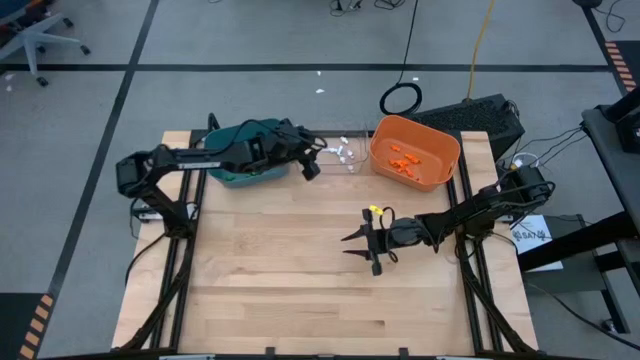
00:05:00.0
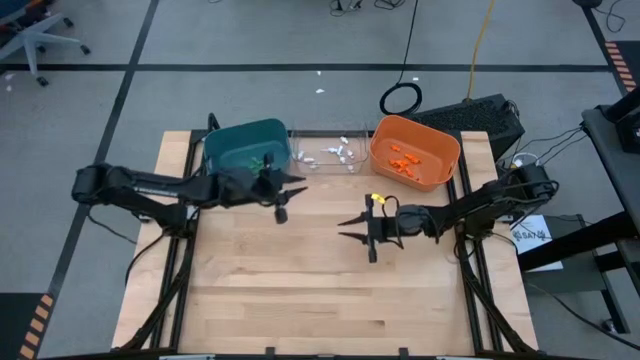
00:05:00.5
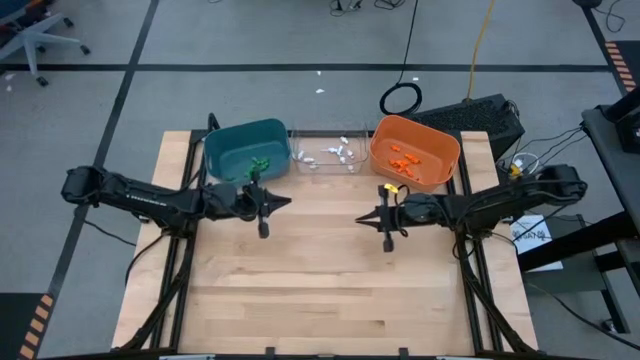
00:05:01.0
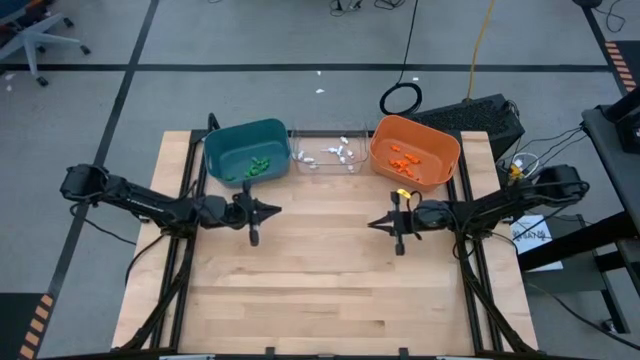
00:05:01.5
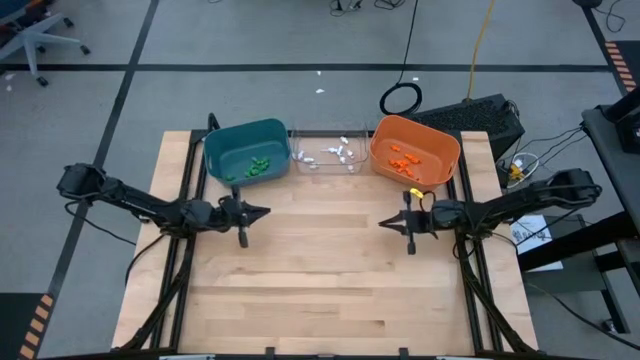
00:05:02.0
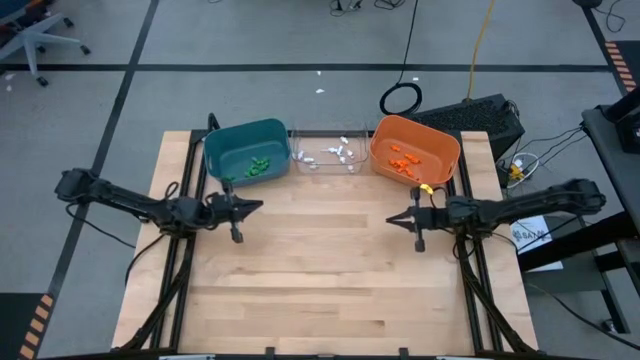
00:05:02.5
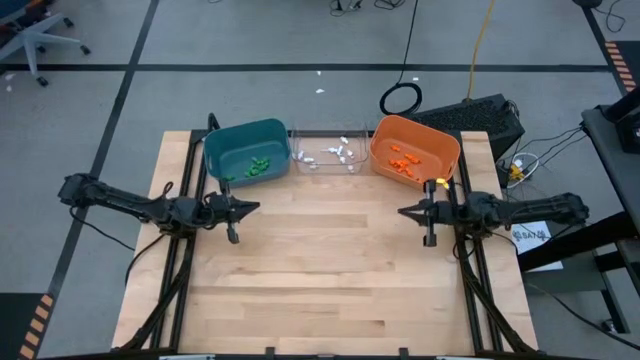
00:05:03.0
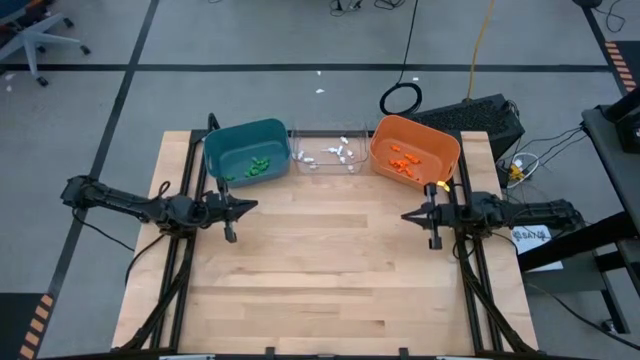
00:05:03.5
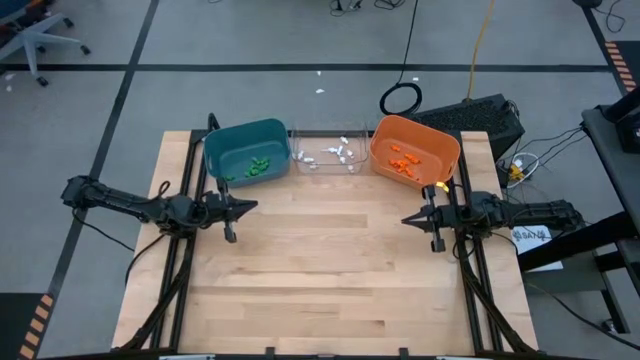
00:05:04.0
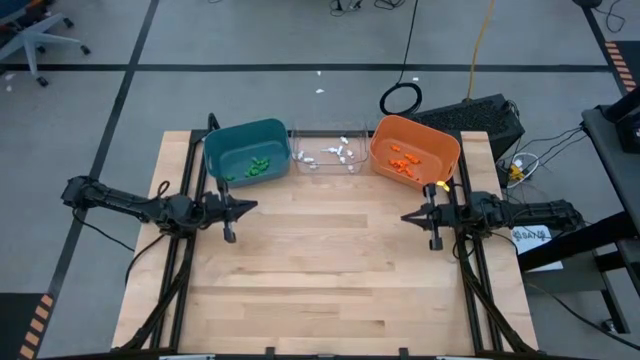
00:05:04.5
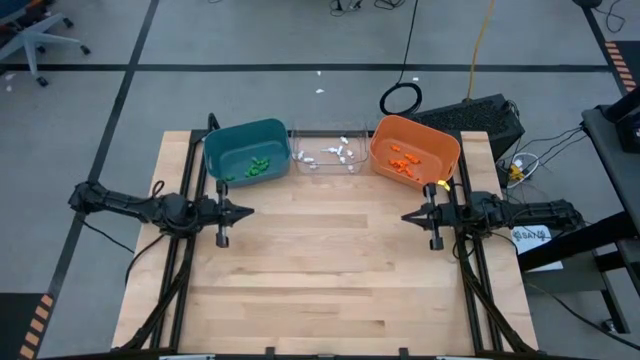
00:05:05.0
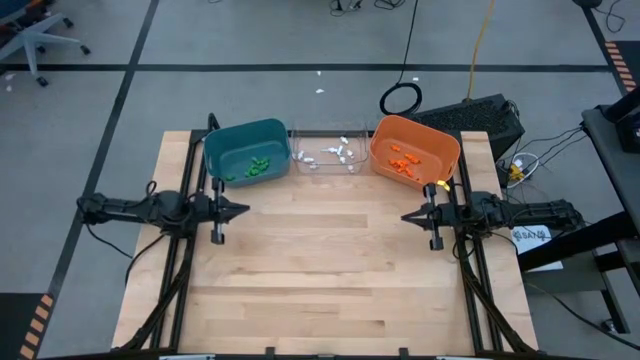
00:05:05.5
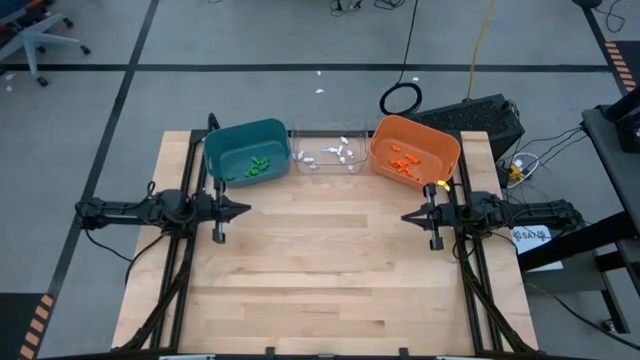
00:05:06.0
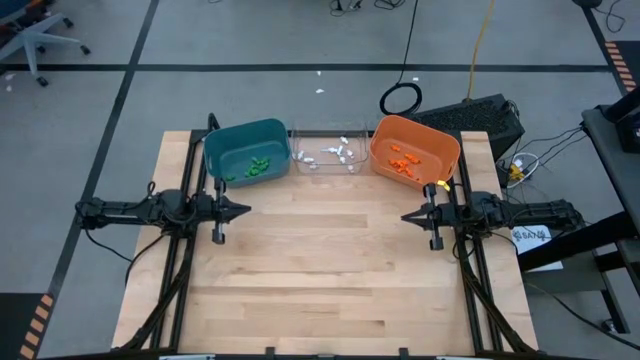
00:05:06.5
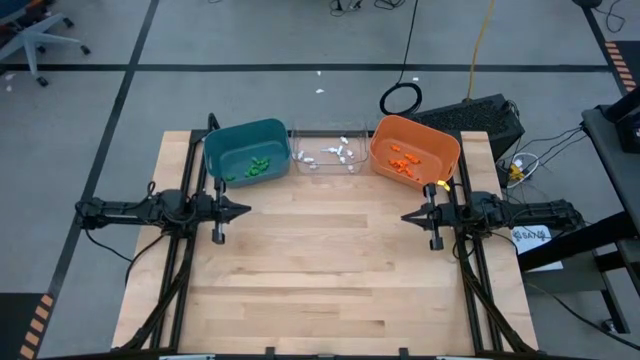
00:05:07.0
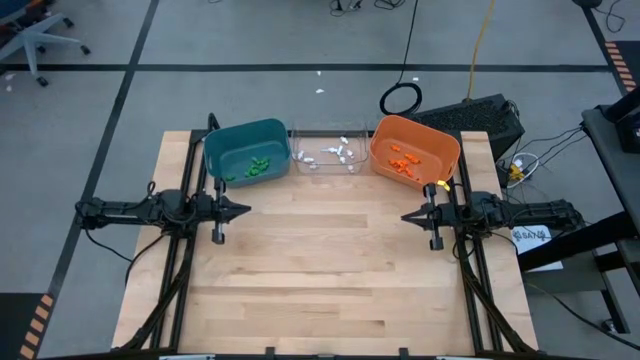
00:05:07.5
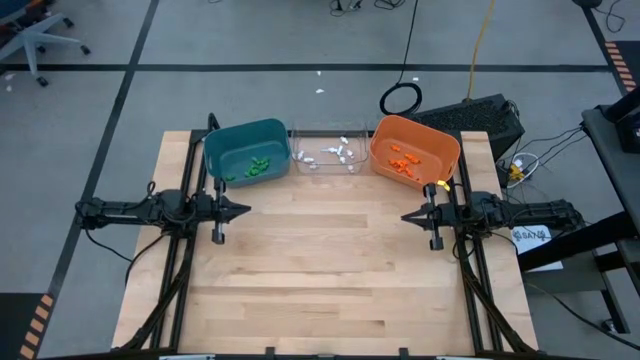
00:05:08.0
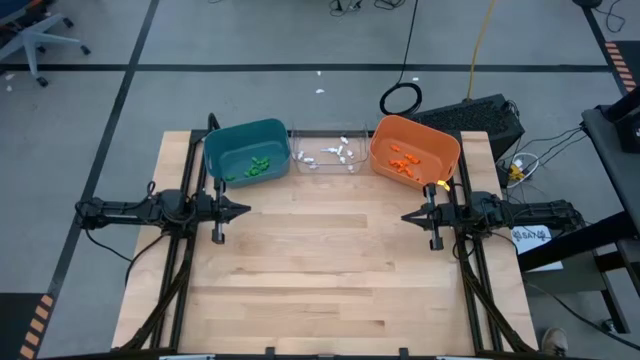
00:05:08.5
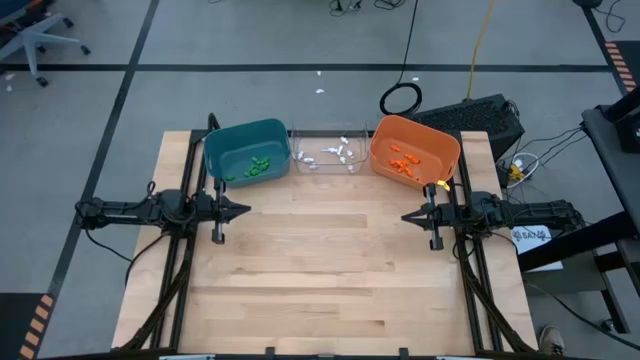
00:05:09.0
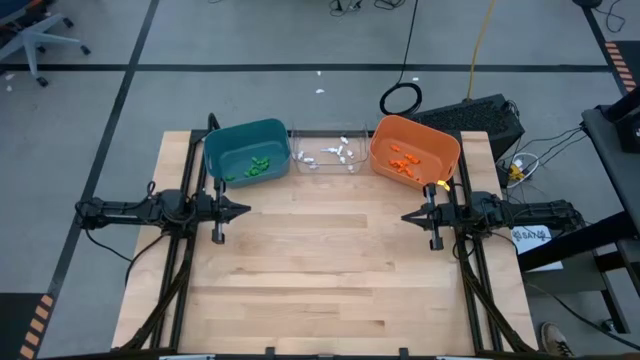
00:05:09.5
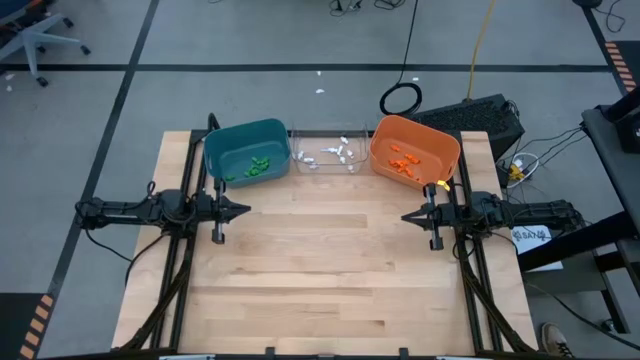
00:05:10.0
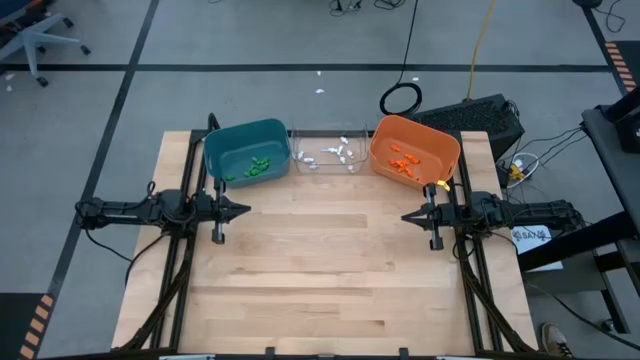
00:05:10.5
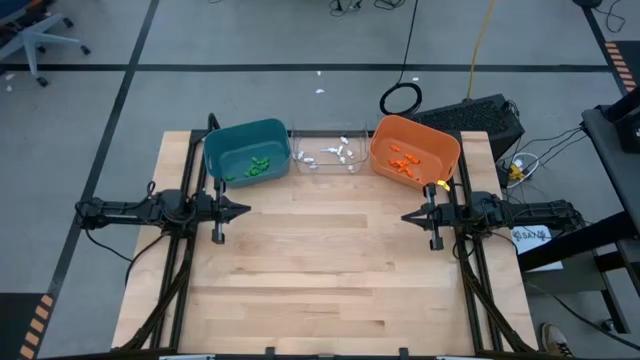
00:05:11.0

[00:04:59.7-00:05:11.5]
Task: Sort Halloween decoration
Return to Home Position

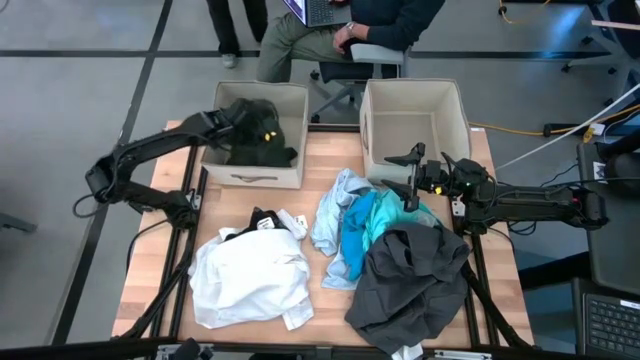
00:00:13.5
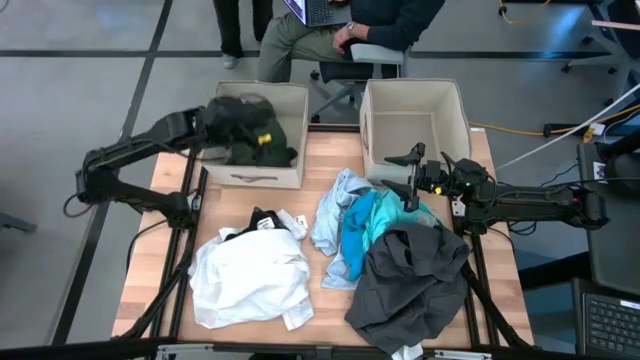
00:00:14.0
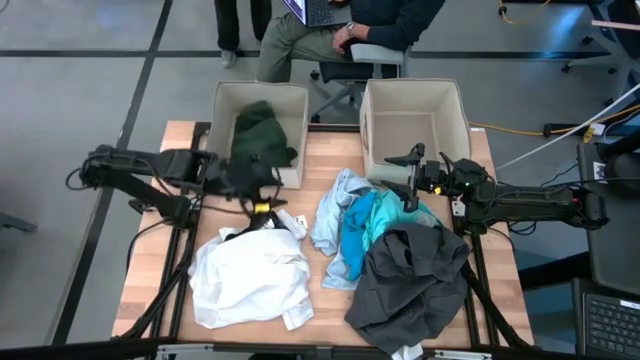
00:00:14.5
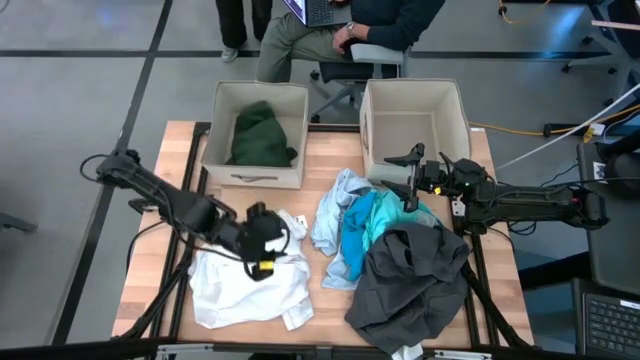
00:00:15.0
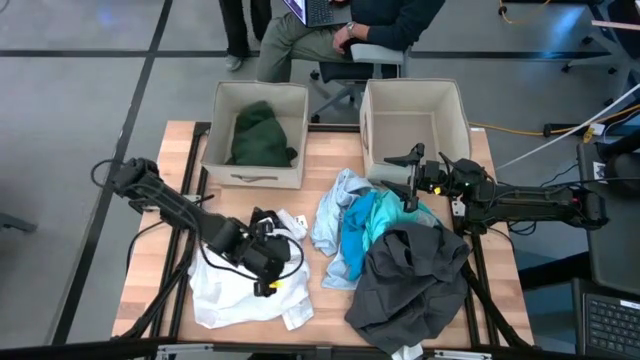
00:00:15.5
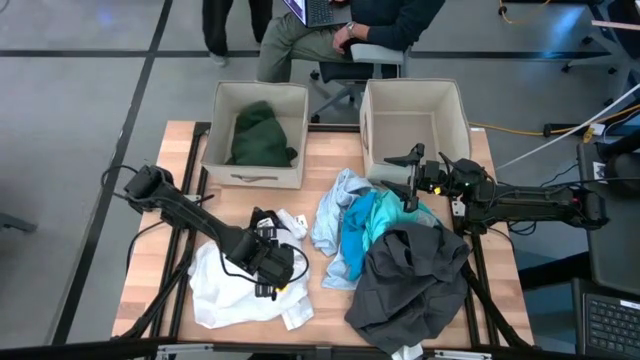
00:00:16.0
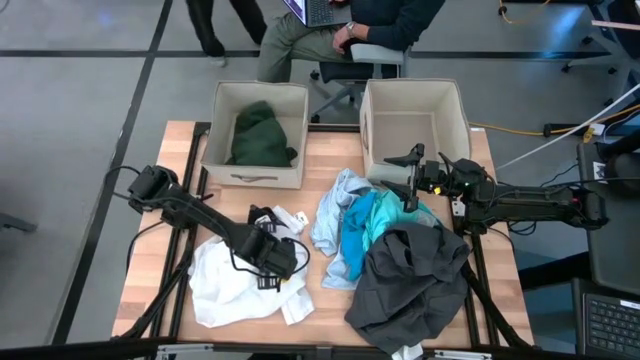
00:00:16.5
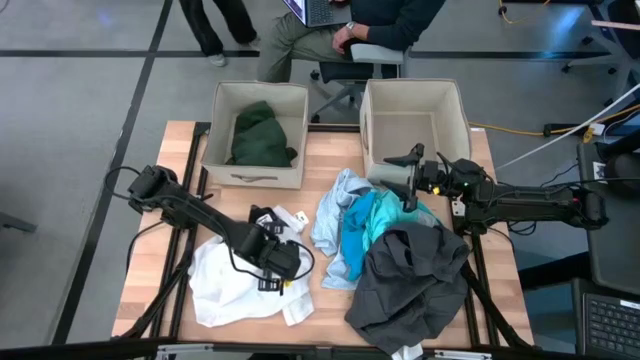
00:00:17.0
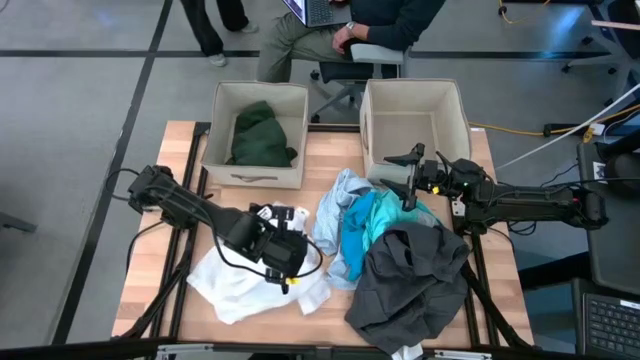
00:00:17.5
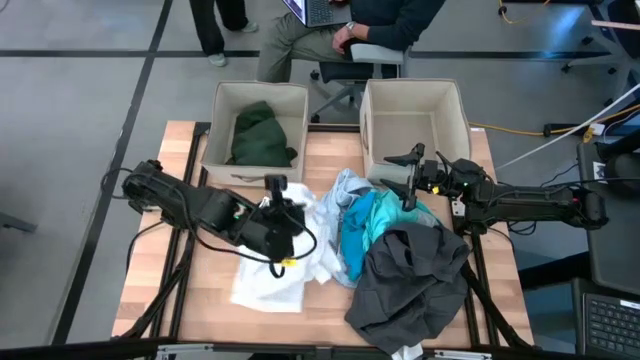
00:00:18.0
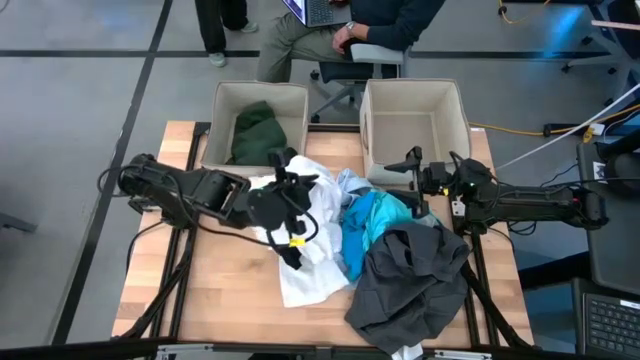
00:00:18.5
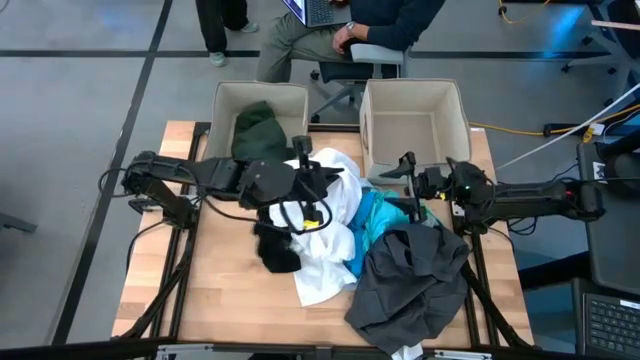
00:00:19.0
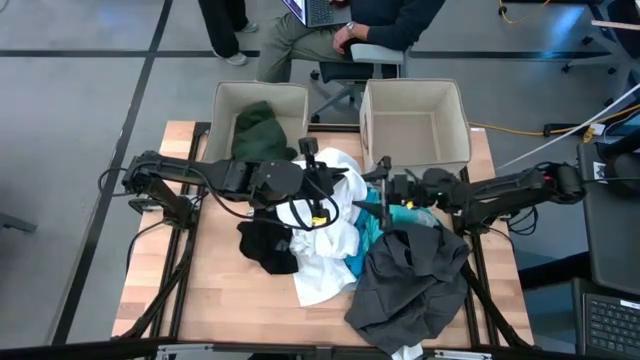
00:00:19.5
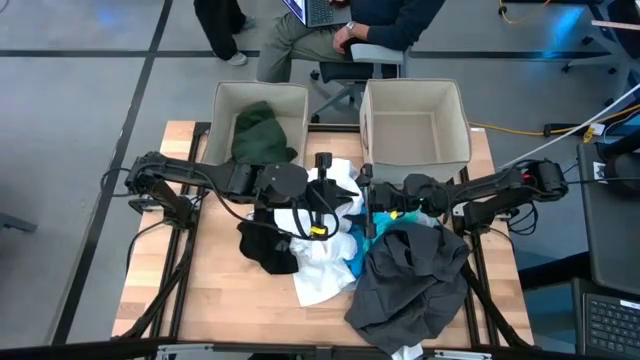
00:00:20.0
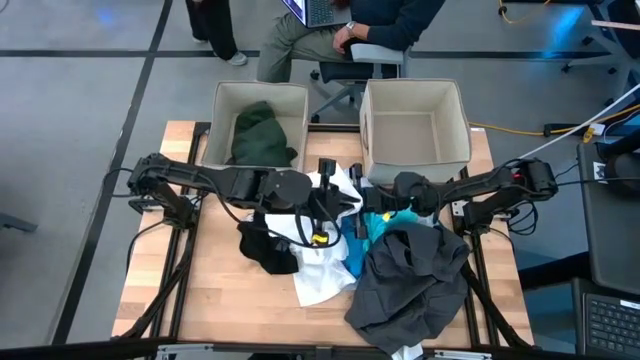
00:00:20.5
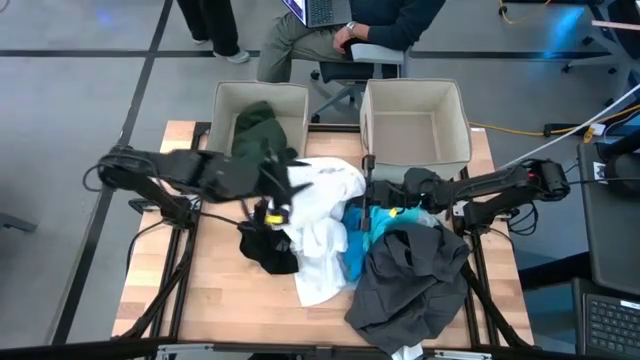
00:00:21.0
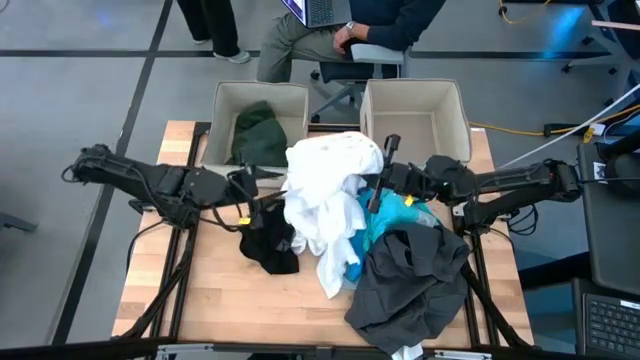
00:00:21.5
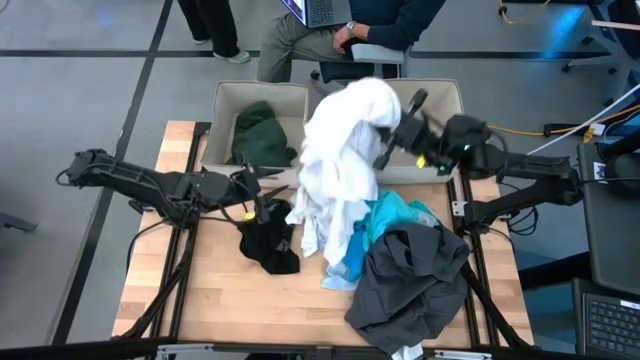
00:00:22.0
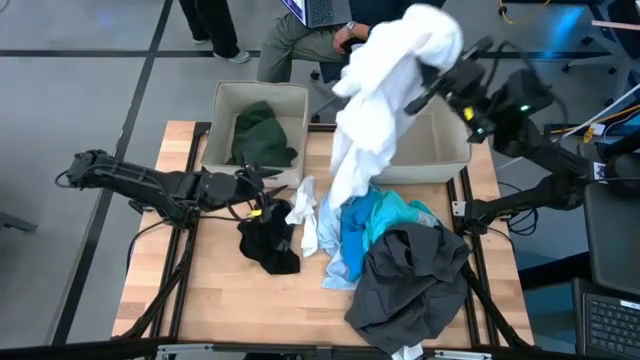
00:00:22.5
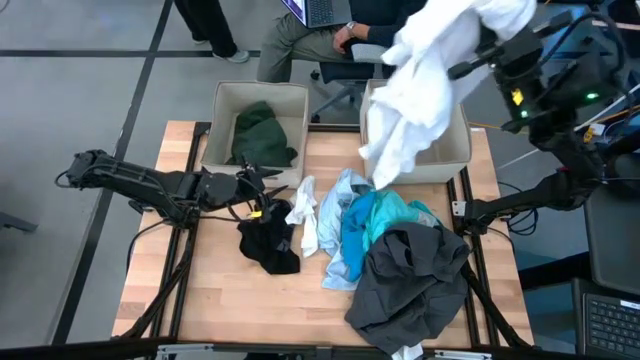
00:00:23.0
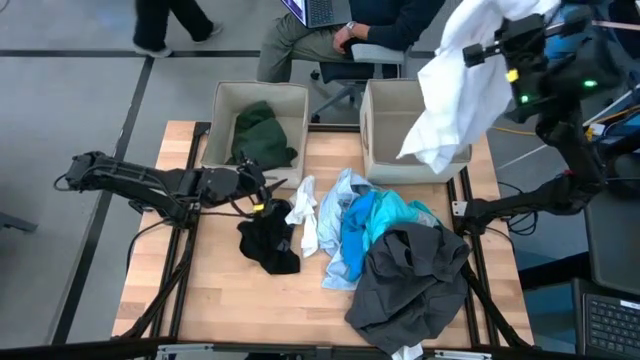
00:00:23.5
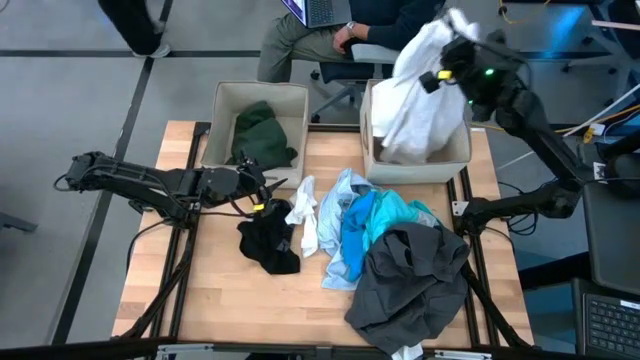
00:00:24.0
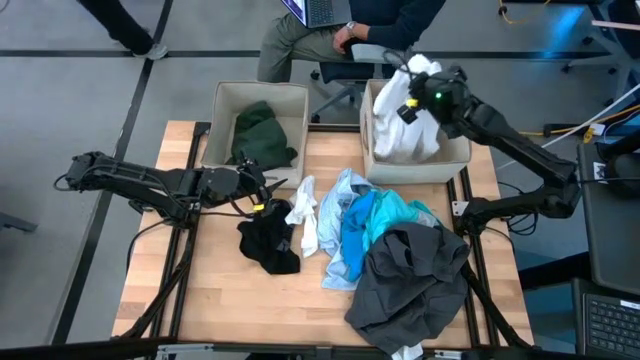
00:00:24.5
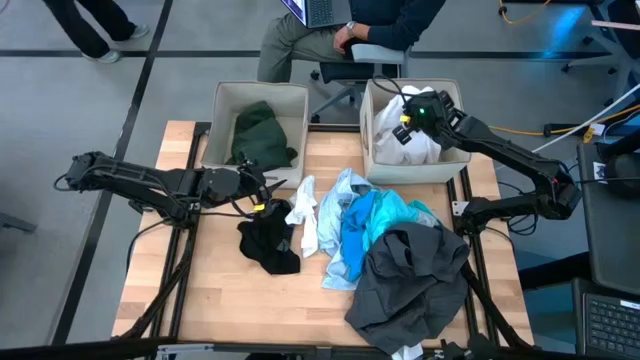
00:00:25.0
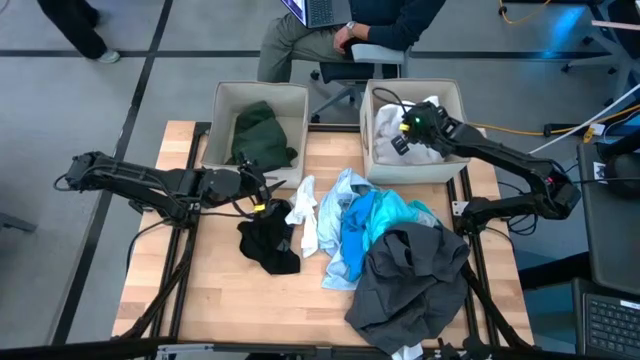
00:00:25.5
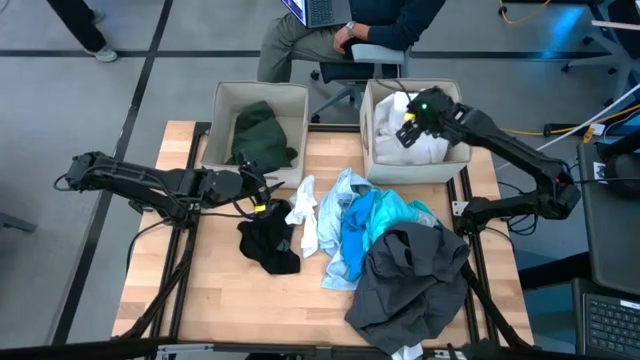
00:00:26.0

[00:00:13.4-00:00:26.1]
Task: Sort clothes
Put the white dress into the right laundry organizer
